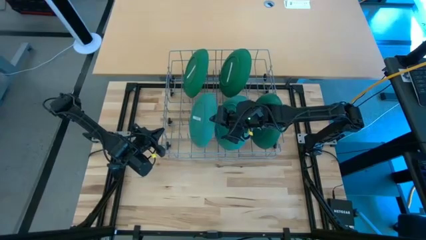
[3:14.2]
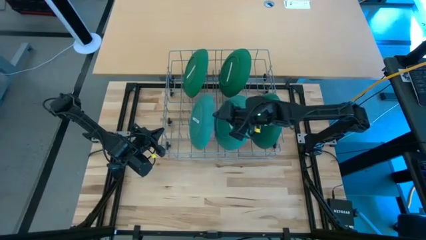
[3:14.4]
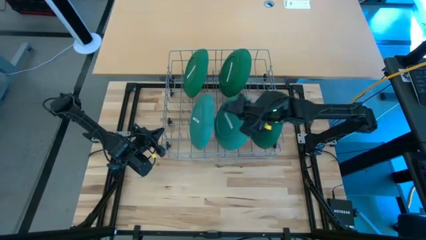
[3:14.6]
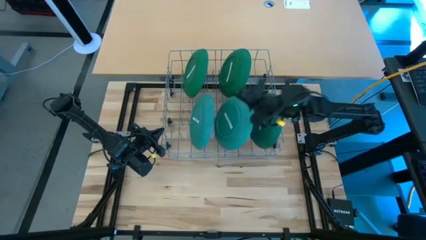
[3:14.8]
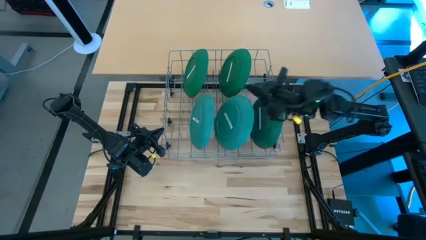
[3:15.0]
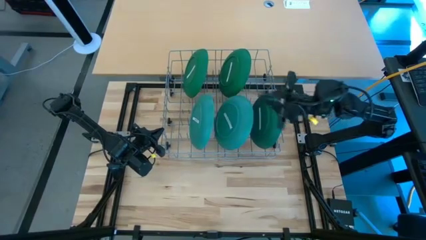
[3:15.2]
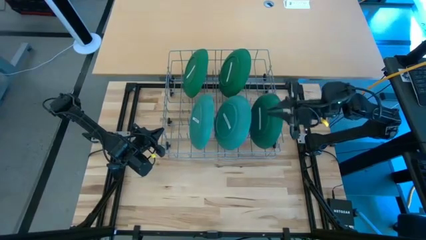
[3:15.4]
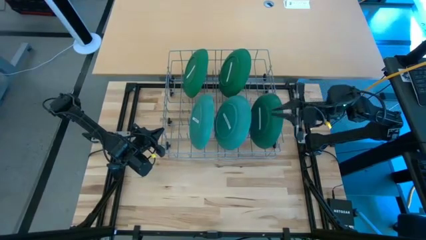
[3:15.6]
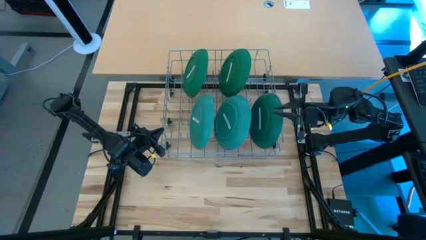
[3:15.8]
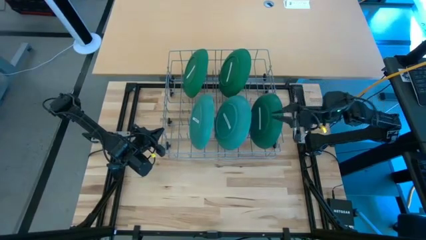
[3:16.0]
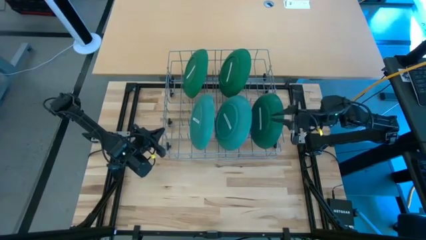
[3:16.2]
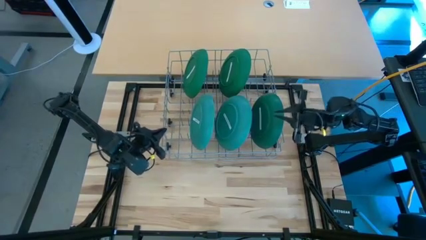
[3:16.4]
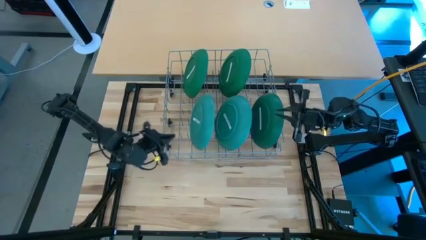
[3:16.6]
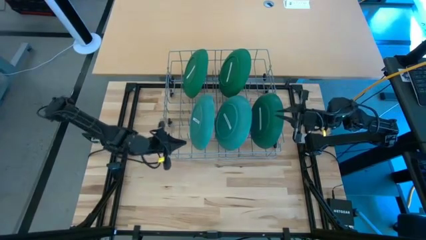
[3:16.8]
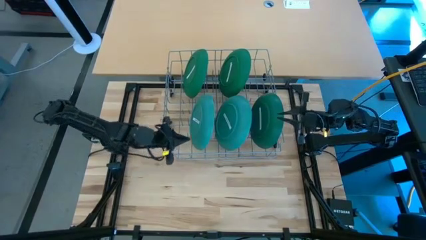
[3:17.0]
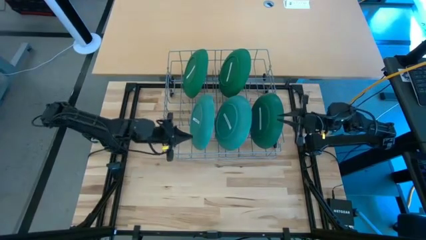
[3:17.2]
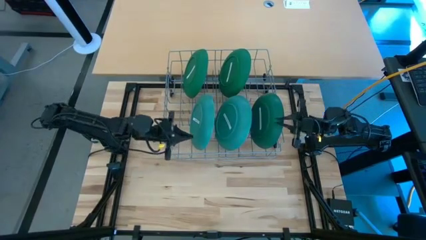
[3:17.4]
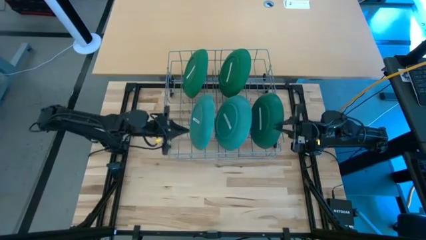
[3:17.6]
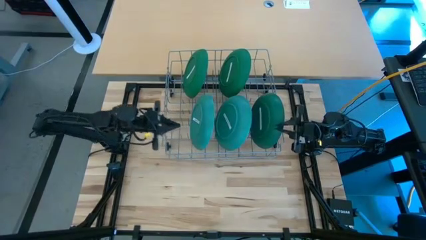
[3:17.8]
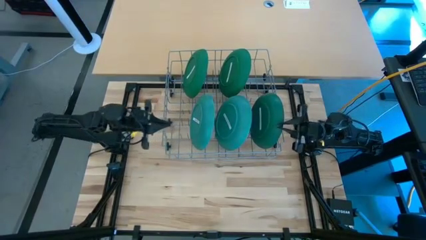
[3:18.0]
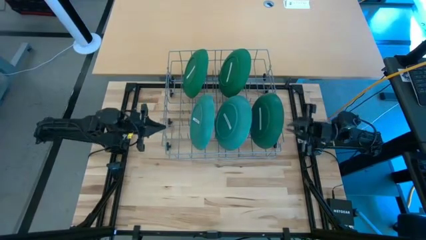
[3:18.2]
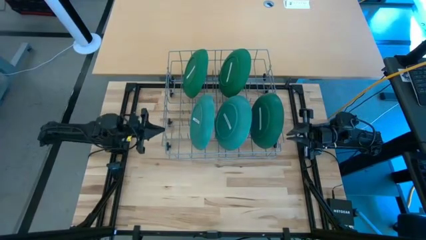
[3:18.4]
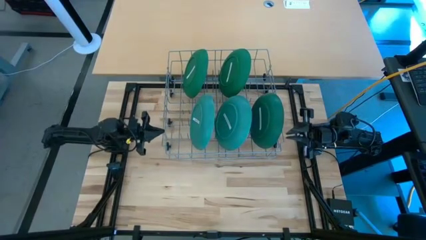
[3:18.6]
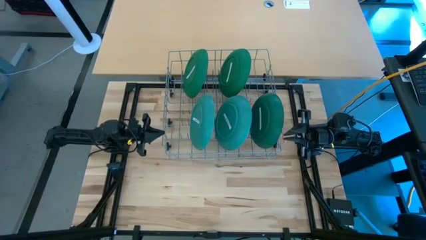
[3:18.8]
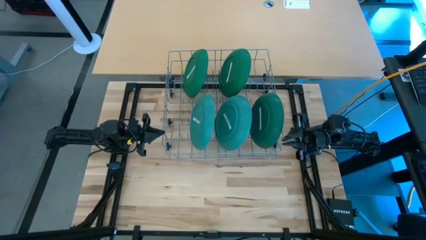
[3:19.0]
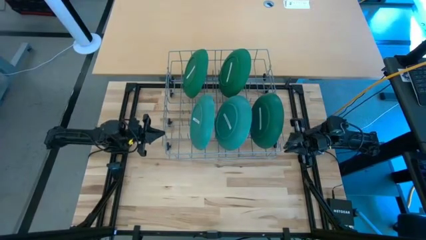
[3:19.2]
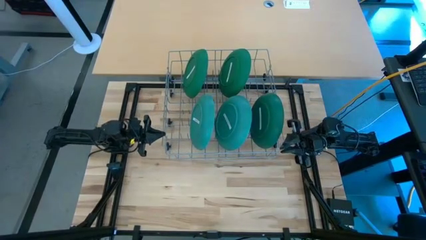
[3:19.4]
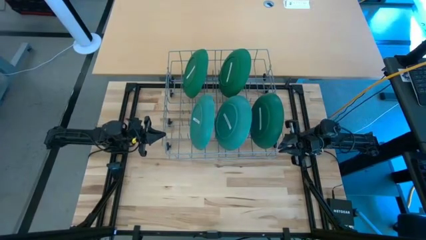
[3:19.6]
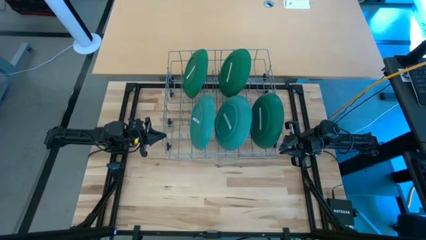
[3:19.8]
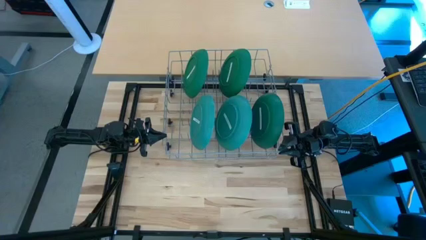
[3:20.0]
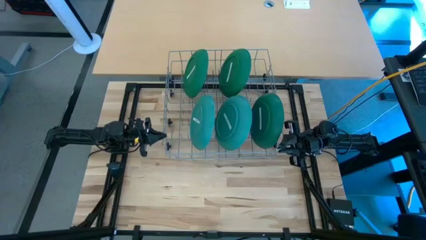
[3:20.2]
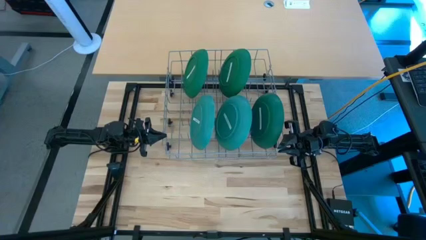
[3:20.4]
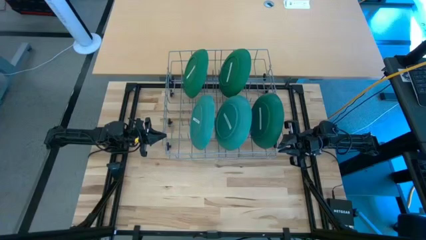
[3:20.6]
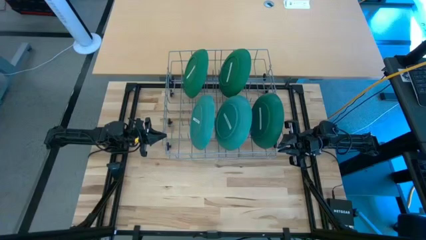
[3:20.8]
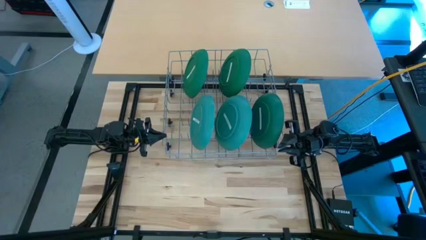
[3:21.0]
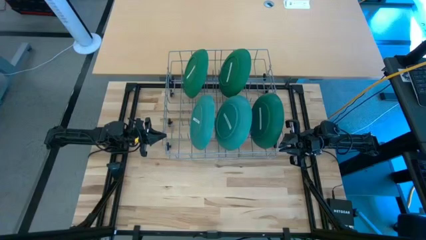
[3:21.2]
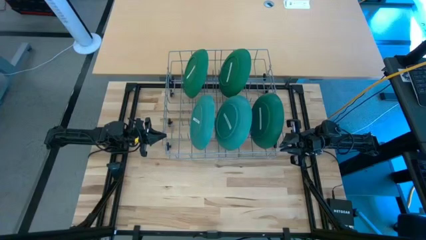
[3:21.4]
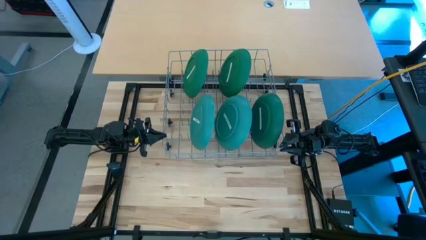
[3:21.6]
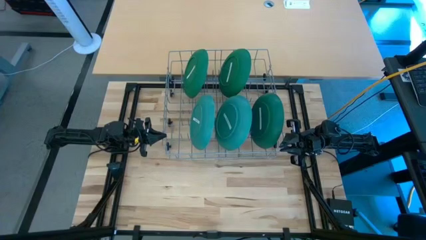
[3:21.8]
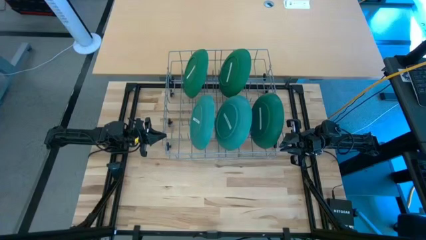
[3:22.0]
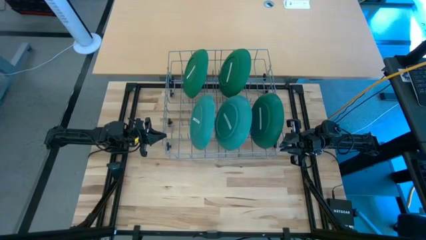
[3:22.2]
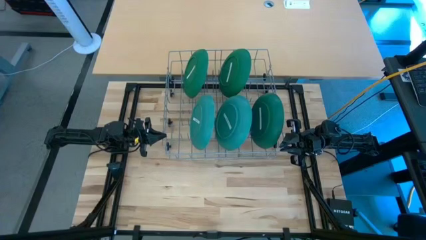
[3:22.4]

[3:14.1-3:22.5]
Task: Sort dishes
Return to Home Position

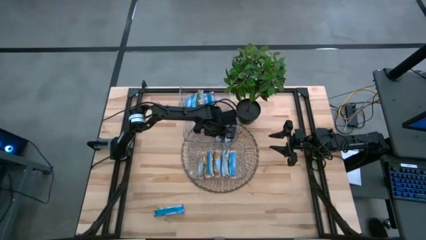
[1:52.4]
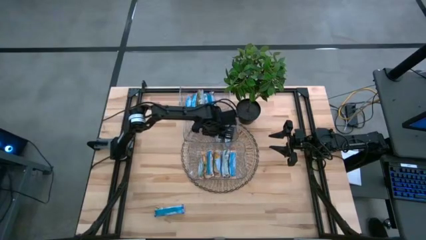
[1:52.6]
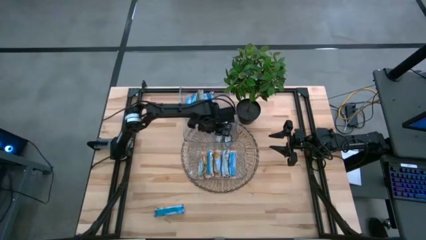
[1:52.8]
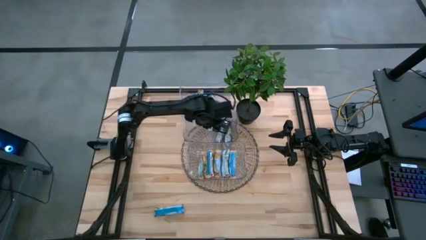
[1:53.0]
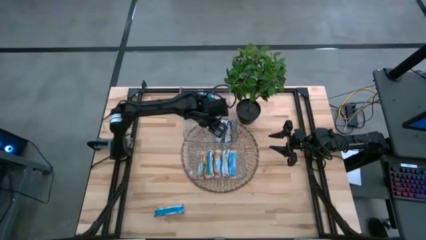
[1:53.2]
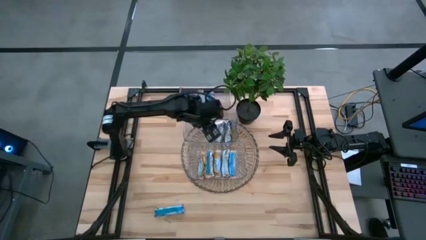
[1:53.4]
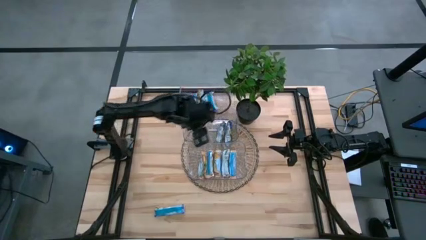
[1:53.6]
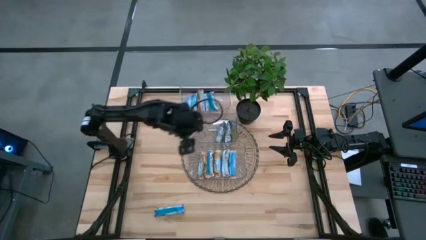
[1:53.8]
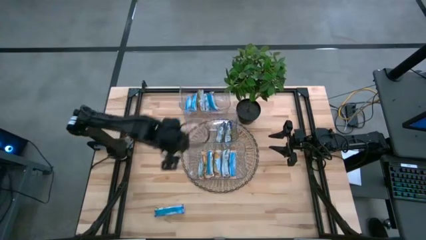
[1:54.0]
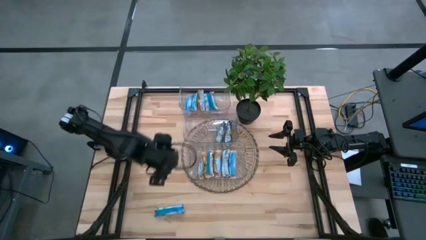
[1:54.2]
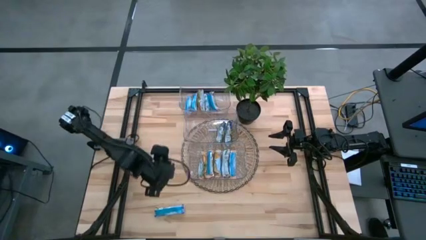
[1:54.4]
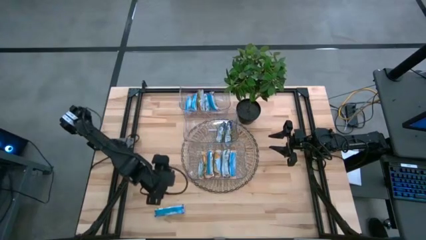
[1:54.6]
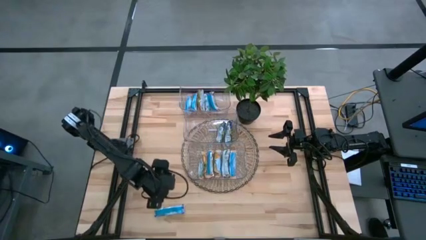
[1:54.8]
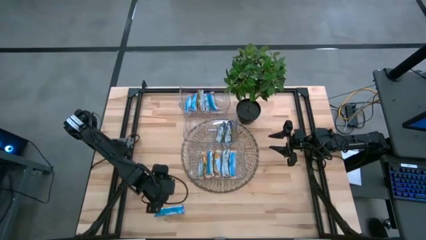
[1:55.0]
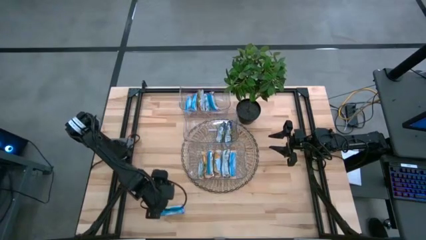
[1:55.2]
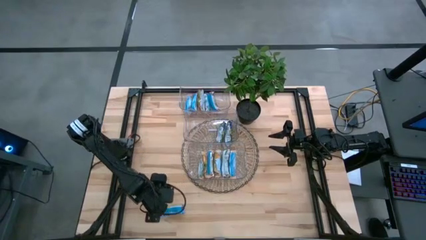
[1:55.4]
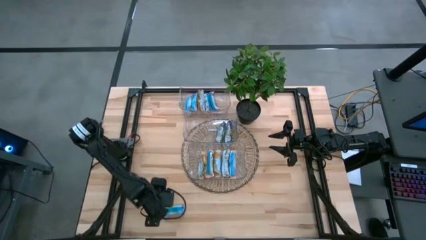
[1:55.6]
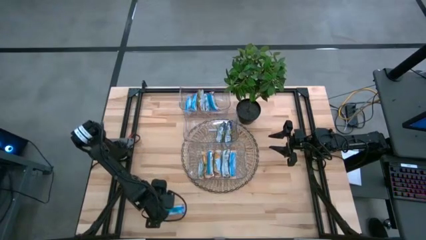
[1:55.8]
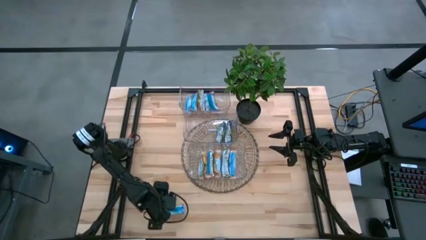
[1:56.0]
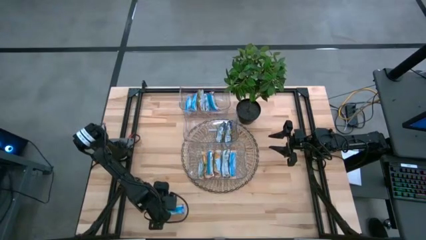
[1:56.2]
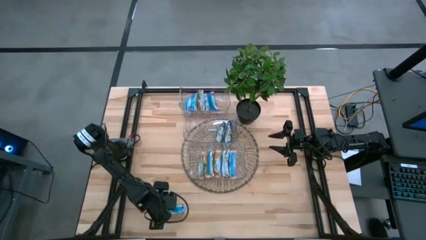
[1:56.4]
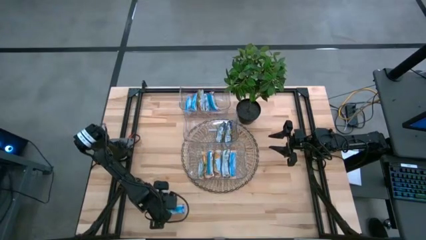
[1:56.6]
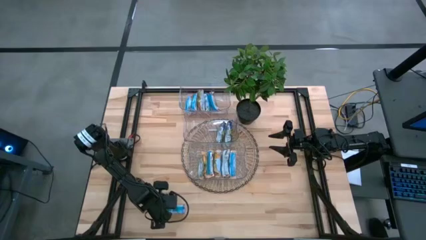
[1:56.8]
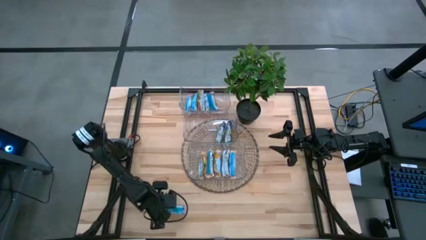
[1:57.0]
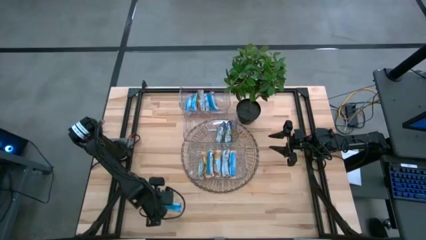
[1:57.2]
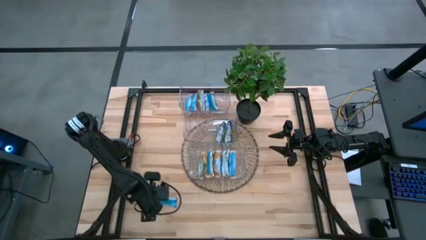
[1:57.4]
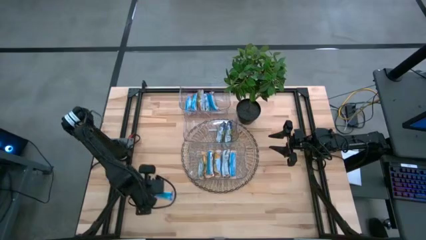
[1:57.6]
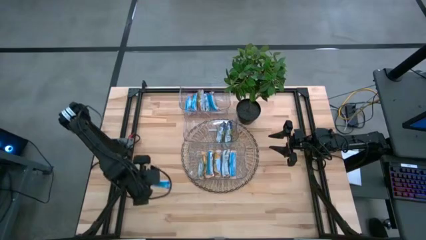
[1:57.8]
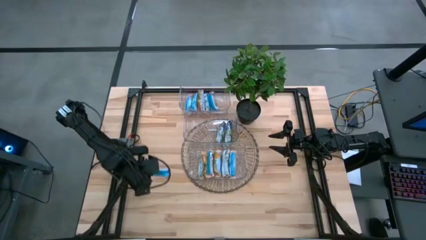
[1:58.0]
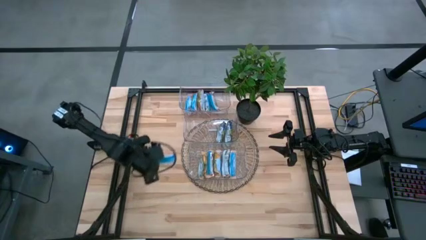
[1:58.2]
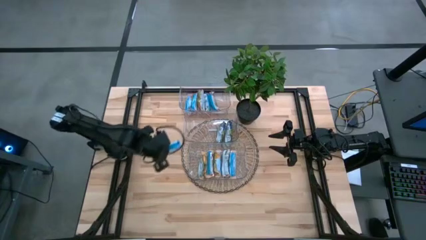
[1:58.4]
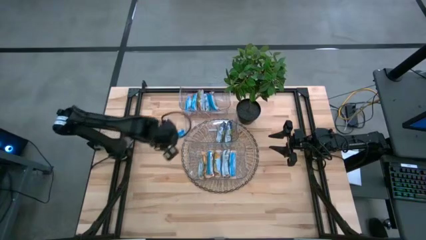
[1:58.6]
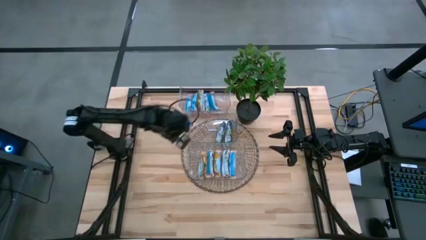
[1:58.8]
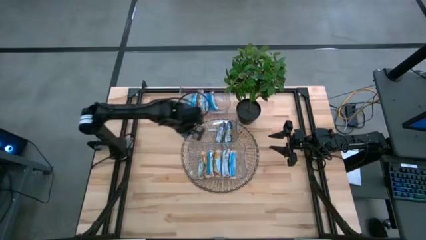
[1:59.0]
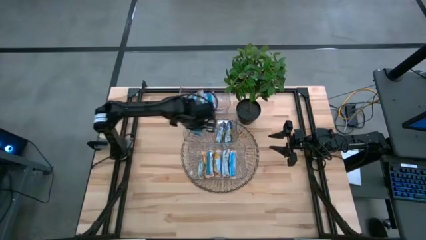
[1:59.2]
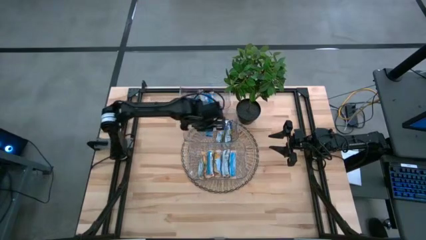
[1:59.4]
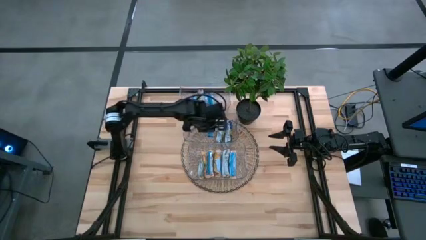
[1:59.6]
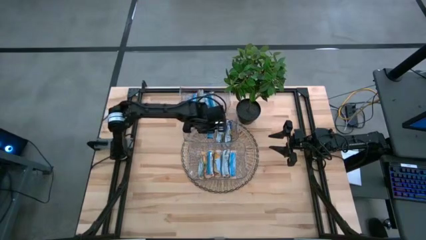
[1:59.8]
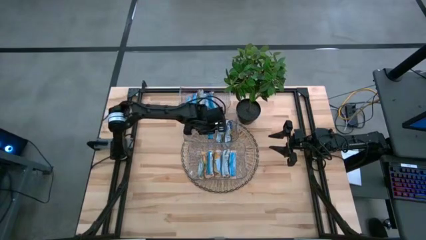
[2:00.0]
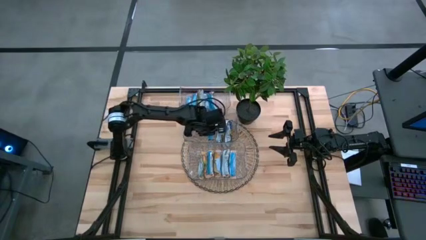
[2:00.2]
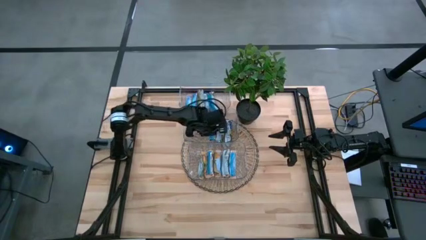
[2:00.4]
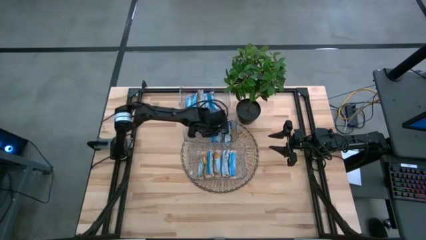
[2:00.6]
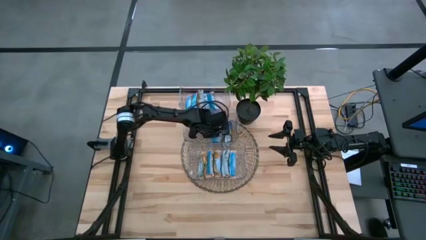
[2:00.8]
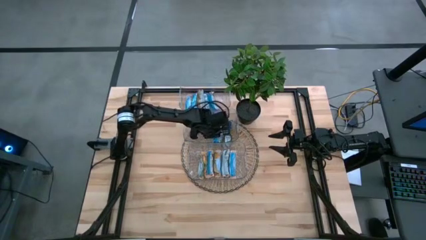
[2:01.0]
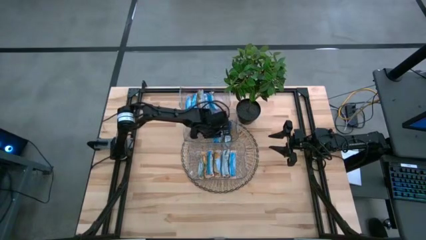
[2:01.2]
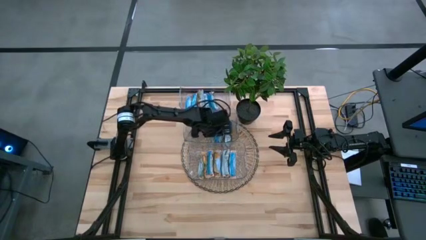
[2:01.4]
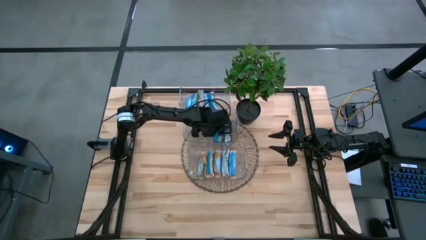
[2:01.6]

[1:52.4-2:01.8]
Task: Pick and place Granola Bars by type
Put the blue granola bar into the middle transparent bin
